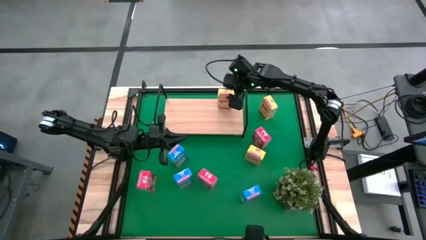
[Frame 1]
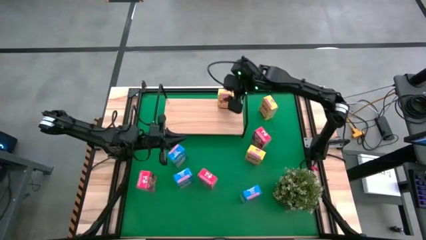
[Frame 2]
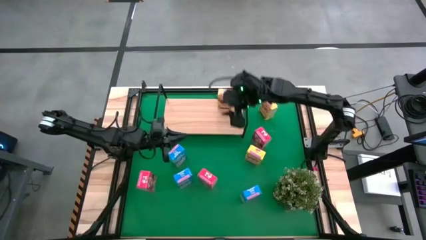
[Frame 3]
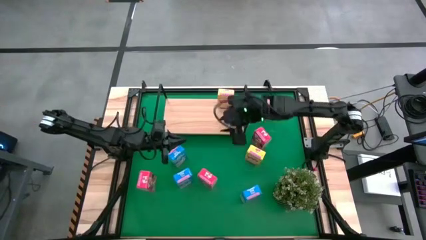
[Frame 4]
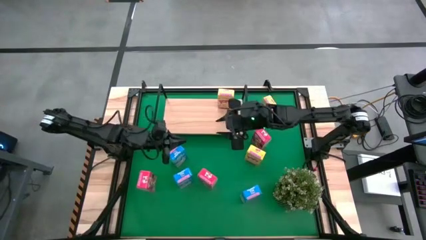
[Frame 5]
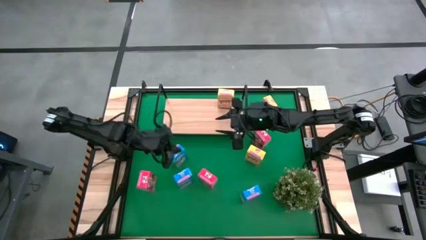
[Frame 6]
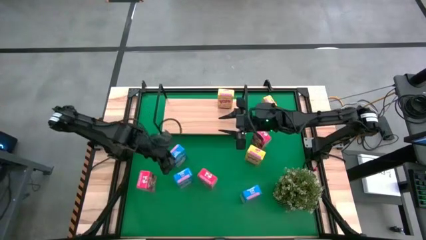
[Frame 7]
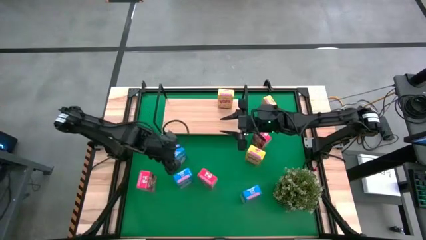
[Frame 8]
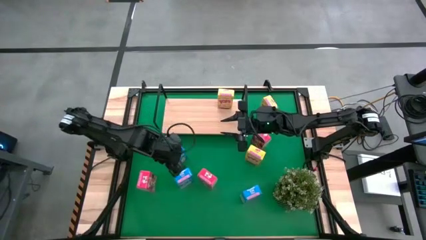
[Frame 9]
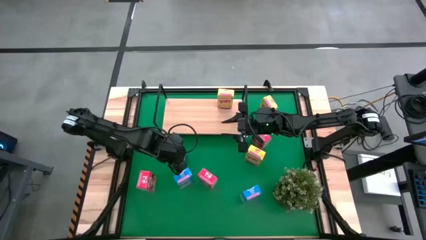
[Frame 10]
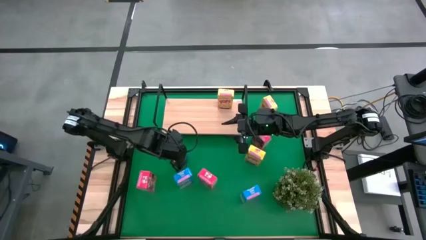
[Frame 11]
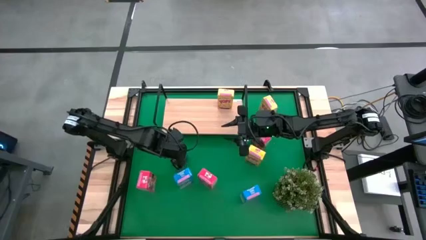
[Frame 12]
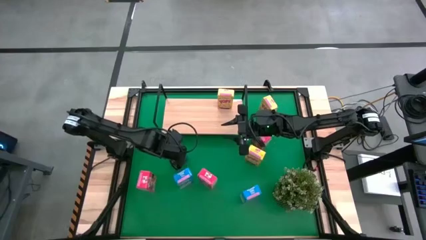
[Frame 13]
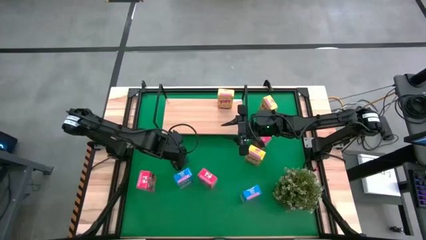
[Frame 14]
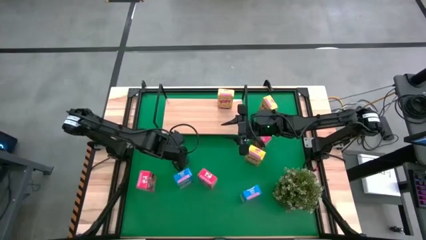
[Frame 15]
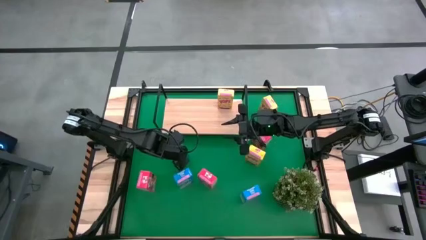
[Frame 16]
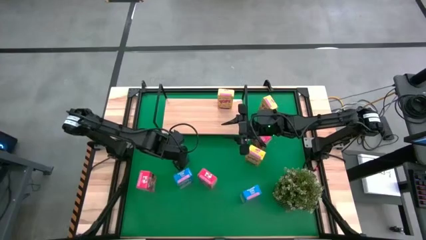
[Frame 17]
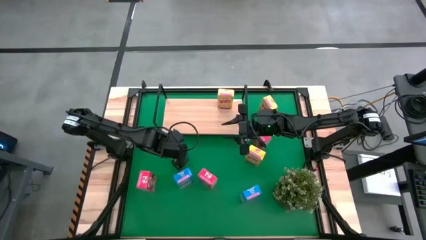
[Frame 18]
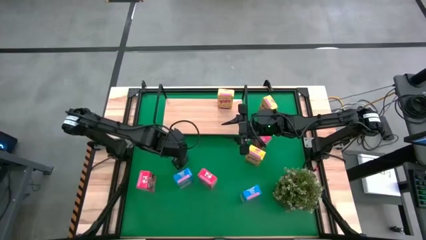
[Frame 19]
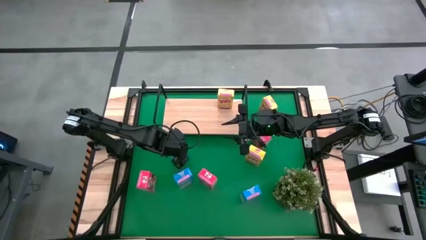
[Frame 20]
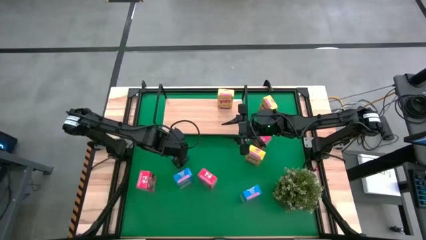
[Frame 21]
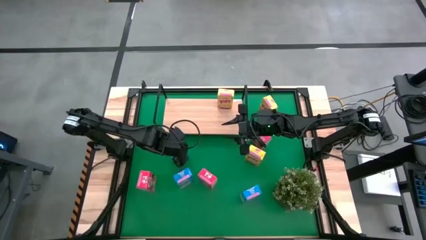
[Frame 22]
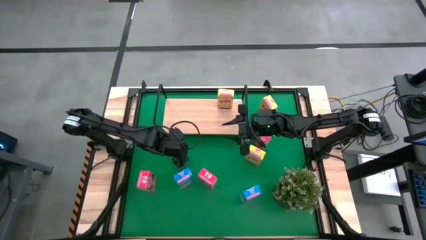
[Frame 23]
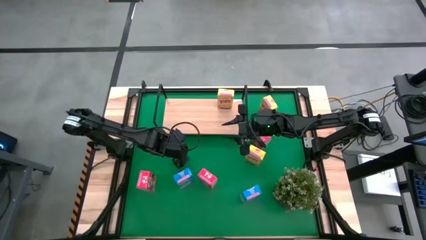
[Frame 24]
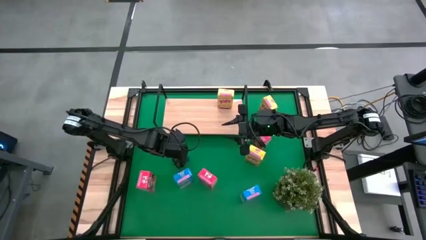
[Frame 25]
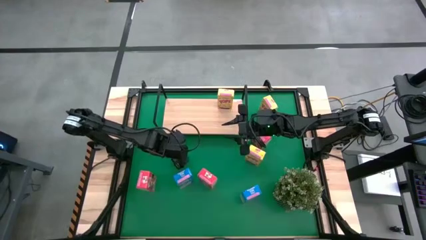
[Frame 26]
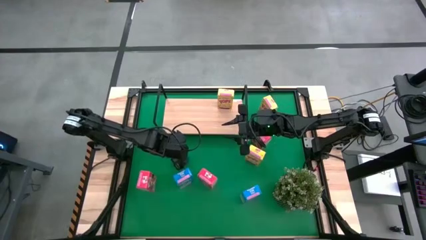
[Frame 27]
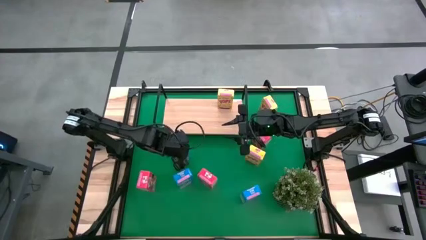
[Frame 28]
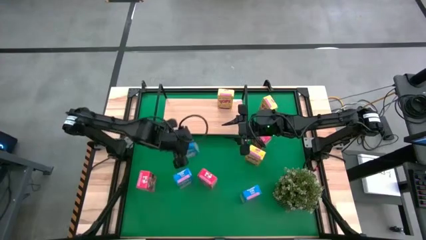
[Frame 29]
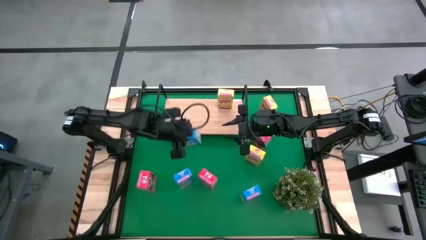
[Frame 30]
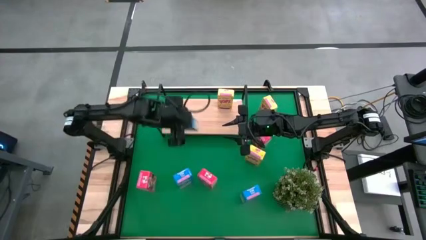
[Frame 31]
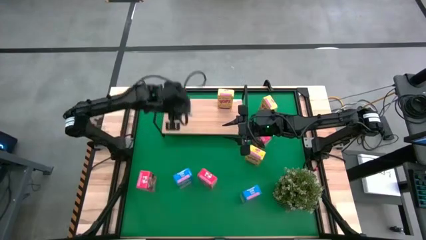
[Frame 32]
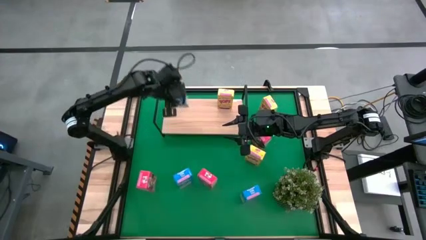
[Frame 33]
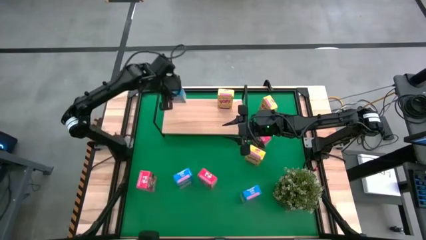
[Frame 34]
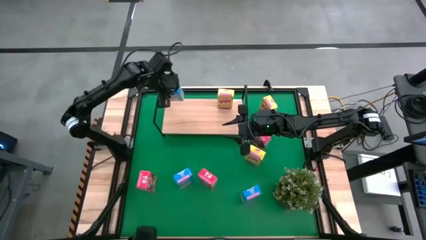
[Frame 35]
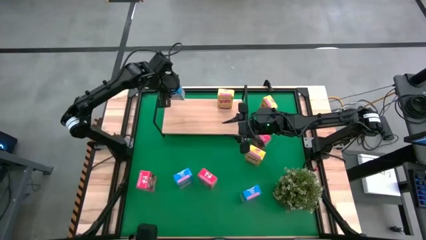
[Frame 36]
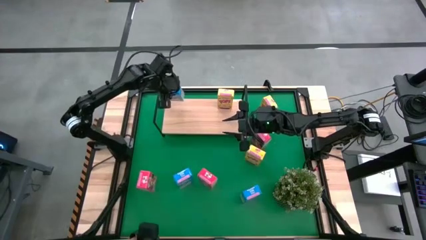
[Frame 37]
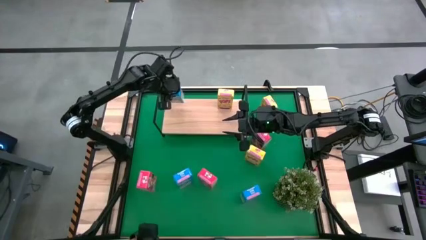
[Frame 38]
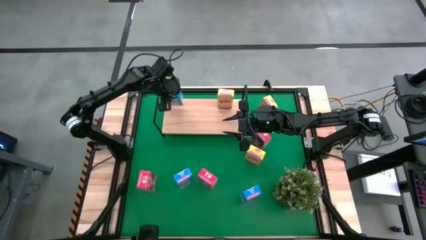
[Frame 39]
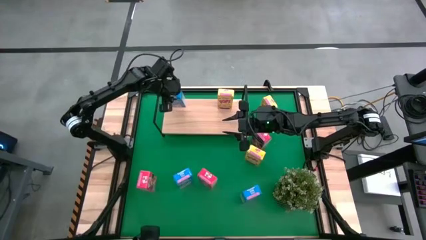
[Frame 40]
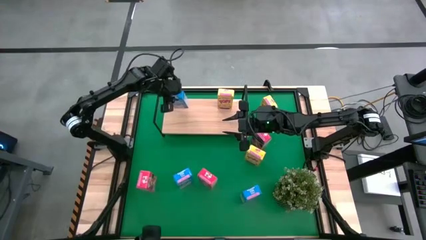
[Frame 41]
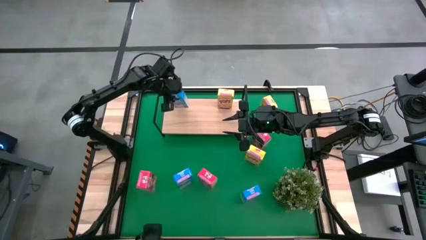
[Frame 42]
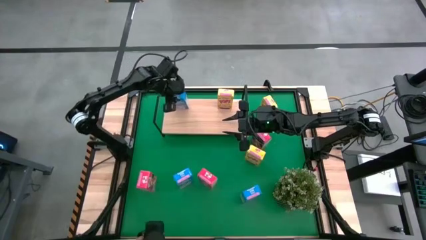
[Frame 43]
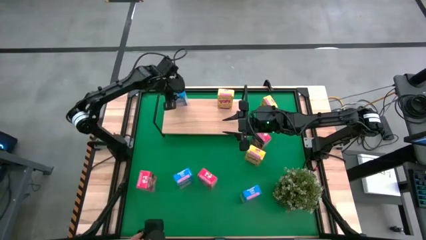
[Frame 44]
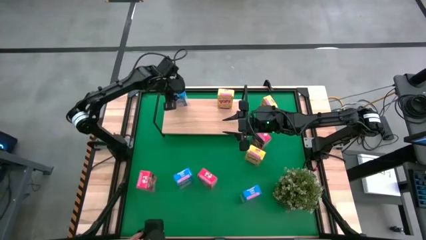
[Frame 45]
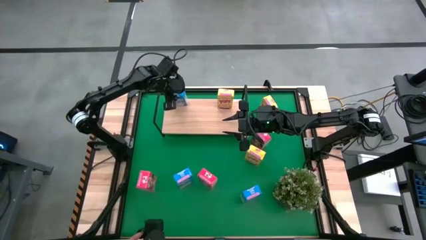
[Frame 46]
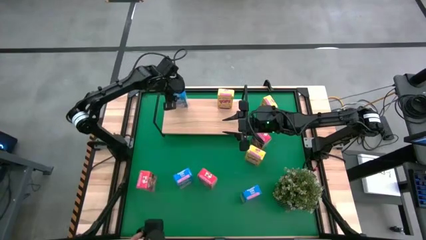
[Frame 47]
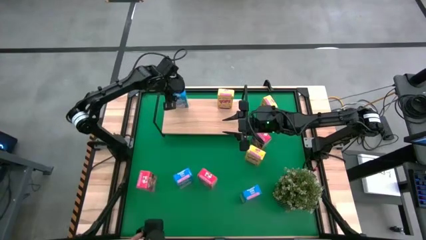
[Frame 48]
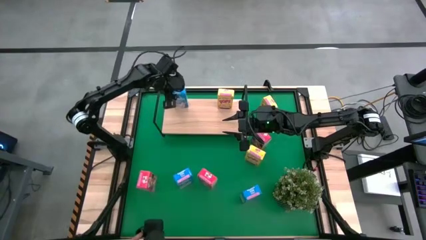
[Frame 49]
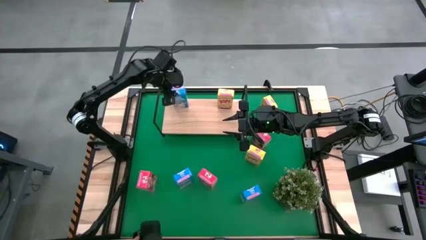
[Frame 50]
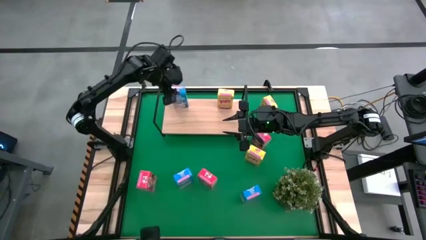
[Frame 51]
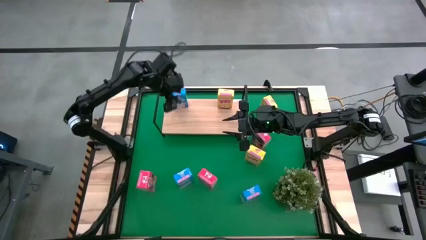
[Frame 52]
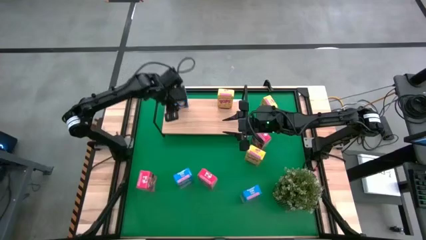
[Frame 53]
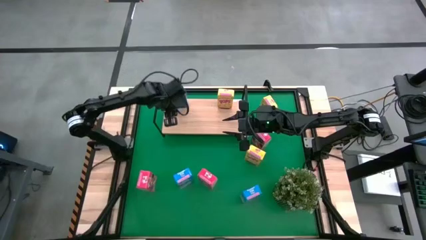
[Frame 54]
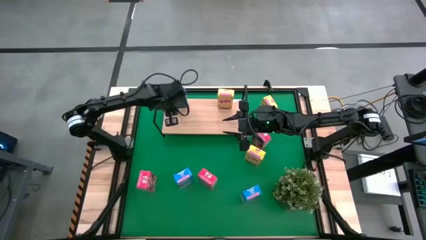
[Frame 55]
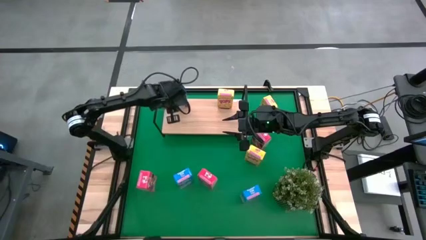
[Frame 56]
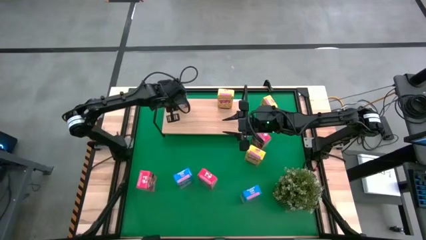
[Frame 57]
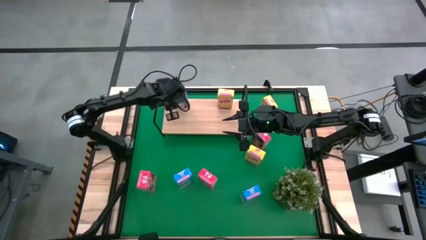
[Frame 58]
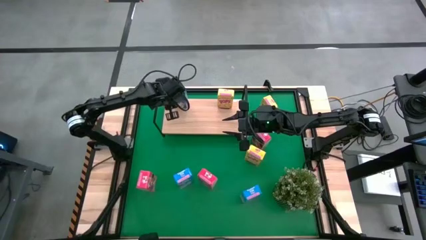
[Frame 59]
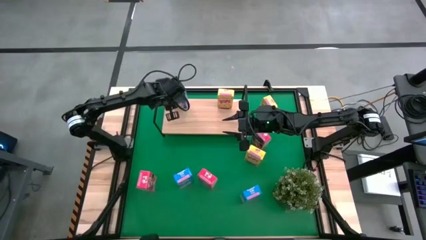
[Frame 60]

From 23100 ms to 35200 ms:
Task: Stack cereal on shelf
Put the top blue cereal box on the shelf

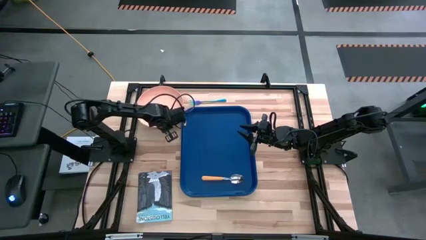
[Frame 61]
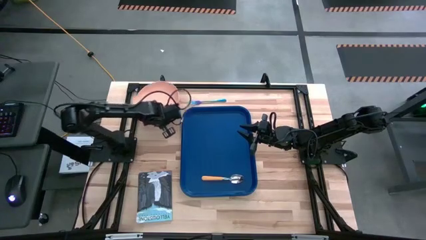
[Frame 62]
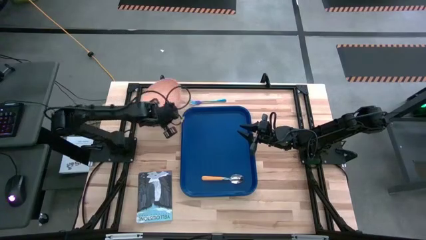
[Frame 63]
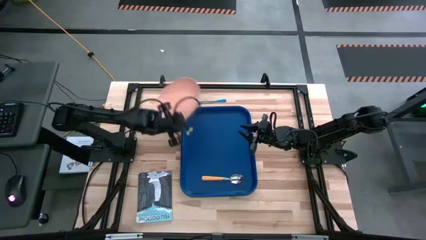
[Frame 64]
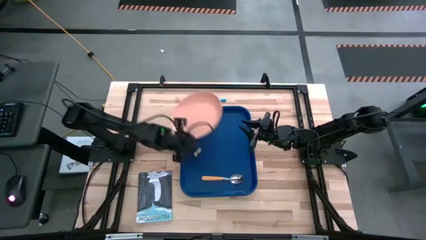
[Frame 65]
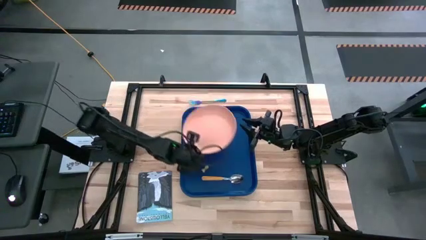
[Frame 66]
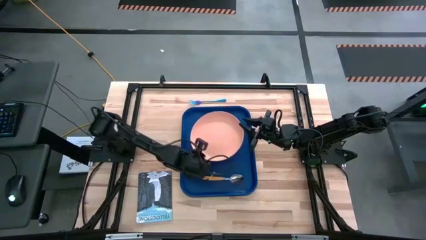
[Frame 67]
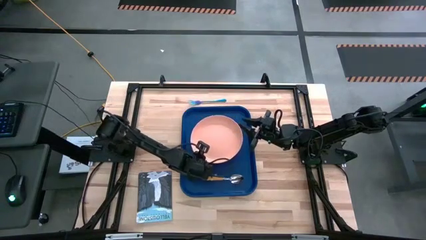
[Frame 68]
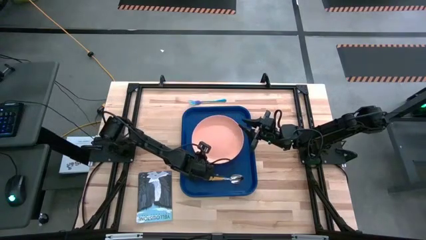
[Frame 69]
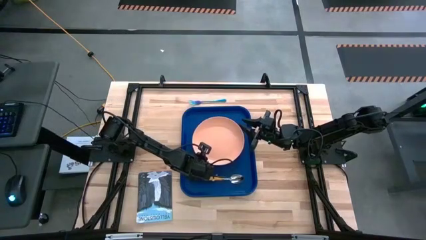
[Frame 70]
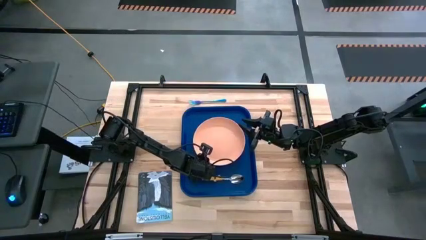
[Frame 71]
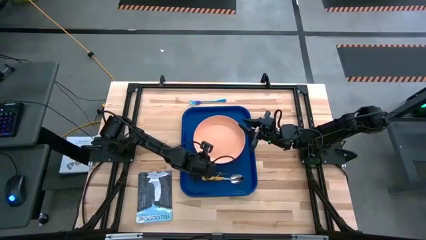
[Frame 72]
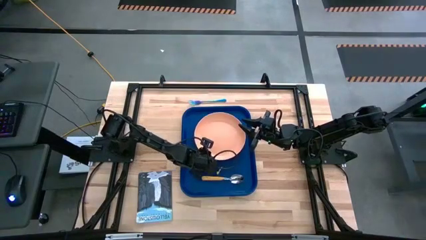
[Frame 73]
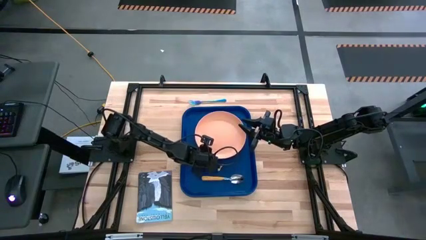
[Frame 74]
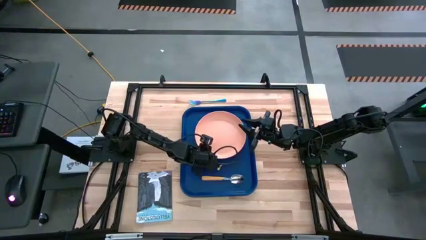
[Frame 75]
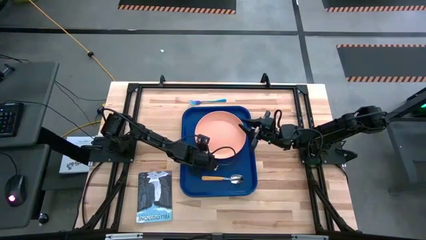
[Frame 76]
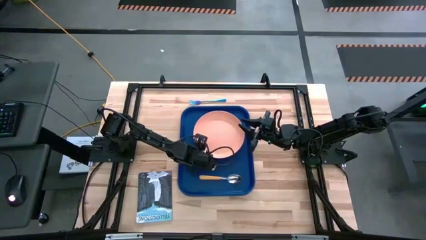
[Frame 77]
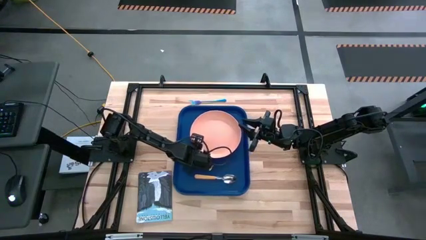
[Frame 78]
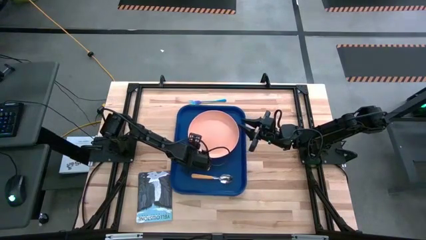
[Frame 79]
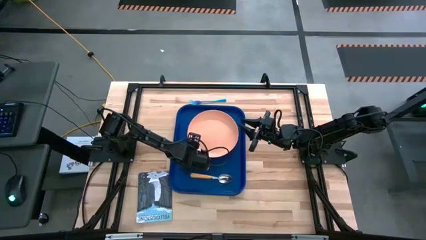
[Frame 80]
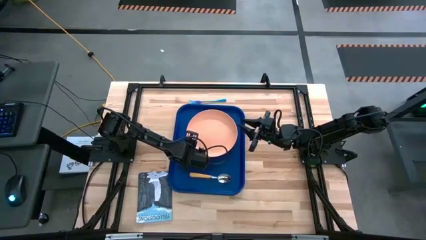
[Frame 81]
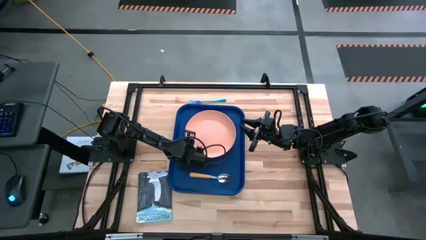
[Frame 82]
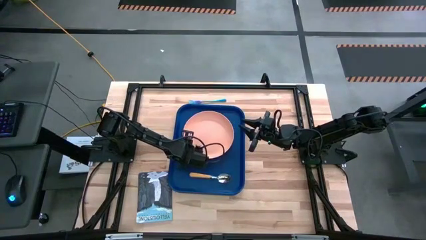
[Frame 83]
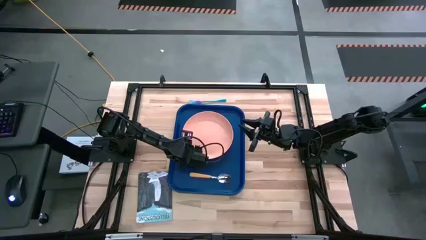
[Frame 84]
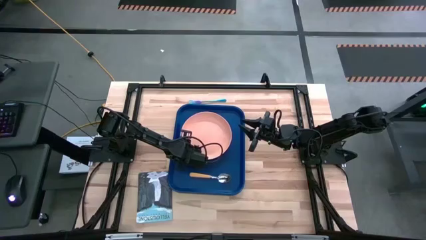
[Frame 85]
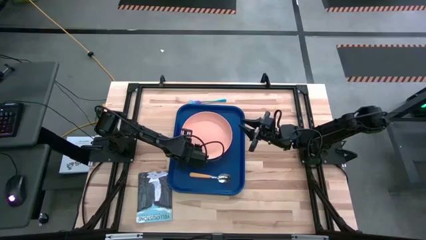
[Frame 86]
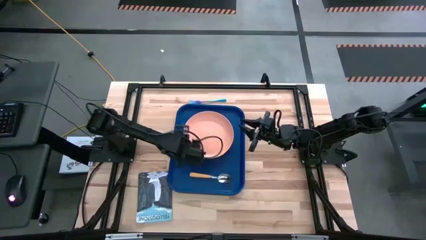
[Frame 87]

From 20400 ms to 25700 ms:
Task: Pick and place plate/cup/fork/spoon on tray
Put the light orange plate on the blue serving tray
